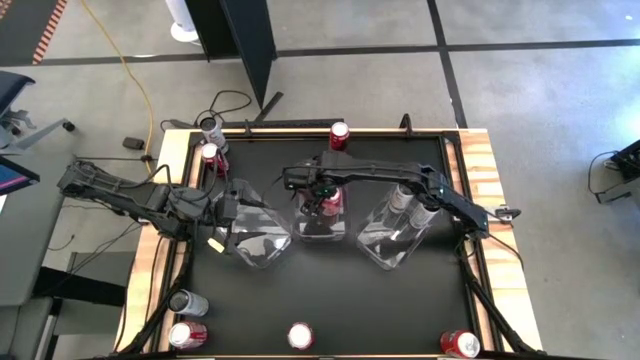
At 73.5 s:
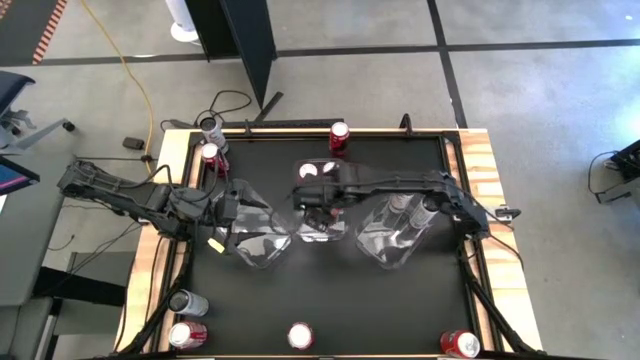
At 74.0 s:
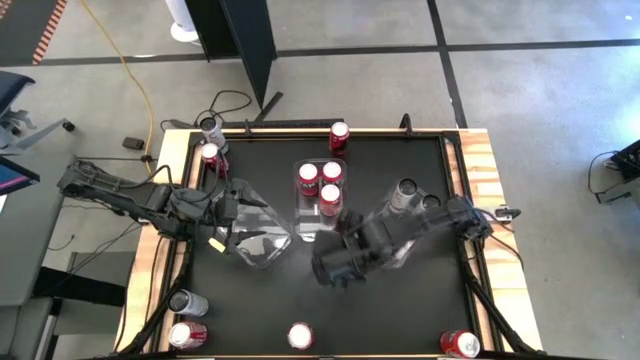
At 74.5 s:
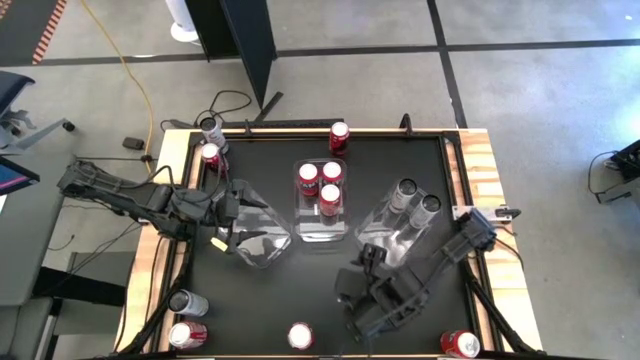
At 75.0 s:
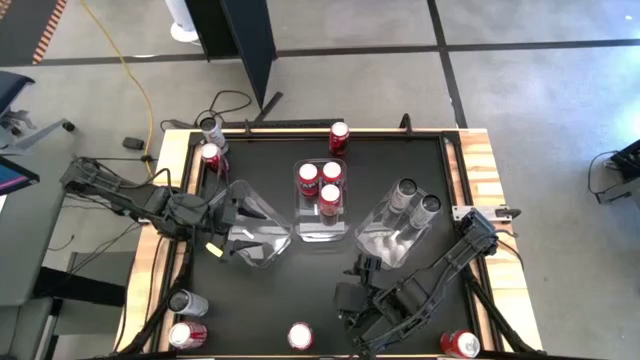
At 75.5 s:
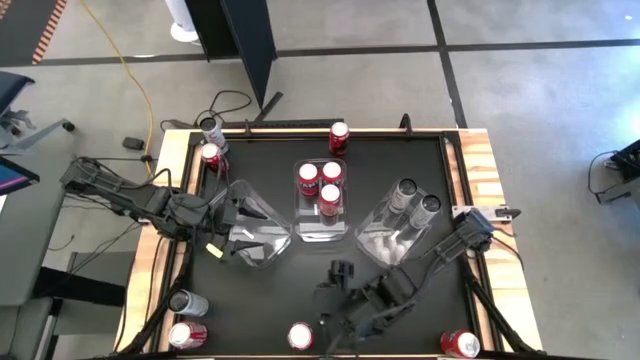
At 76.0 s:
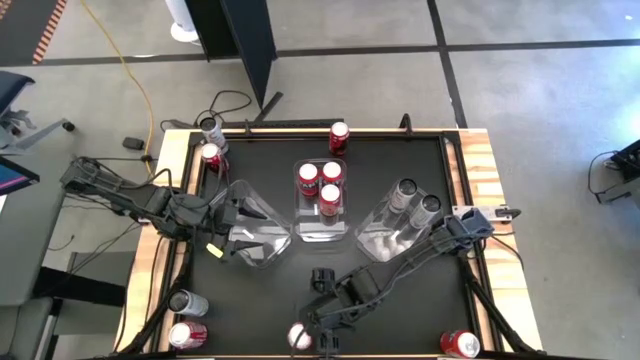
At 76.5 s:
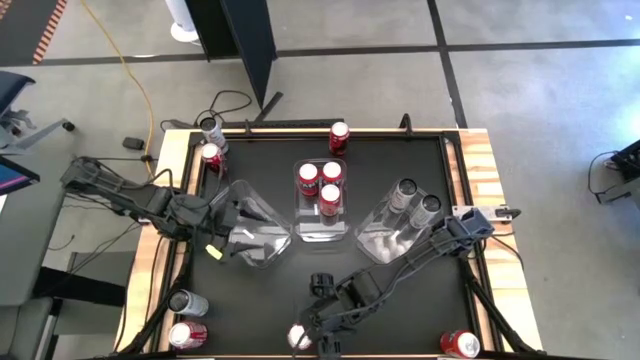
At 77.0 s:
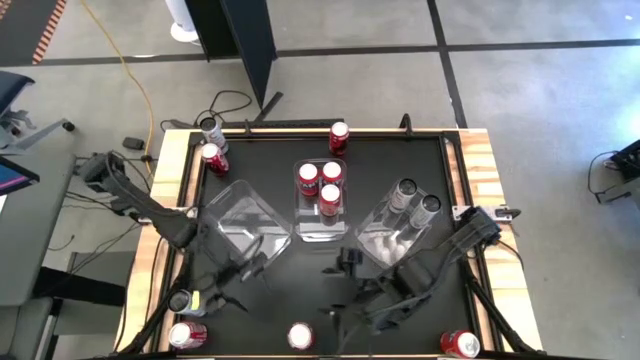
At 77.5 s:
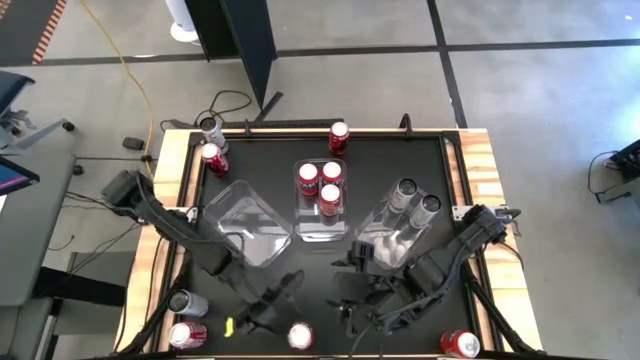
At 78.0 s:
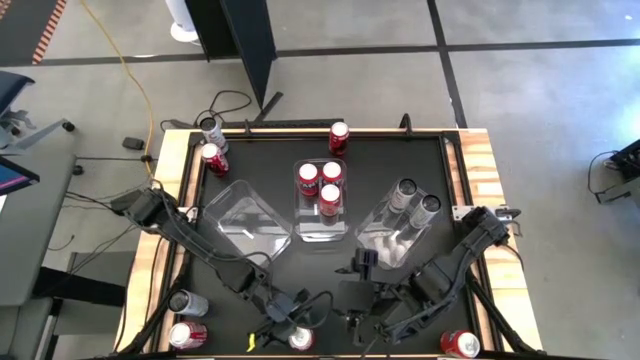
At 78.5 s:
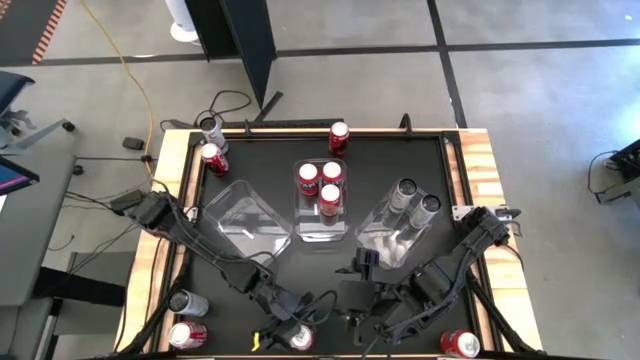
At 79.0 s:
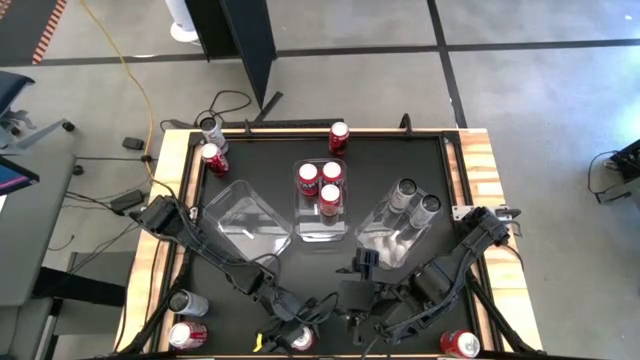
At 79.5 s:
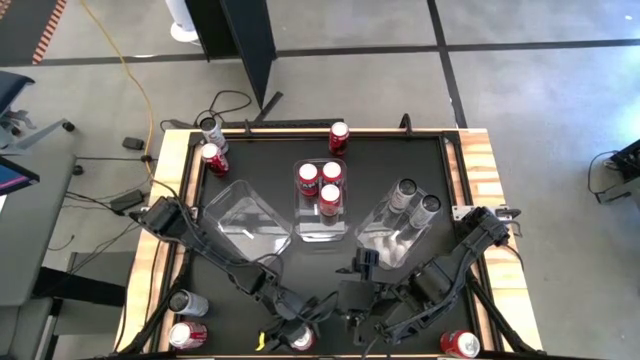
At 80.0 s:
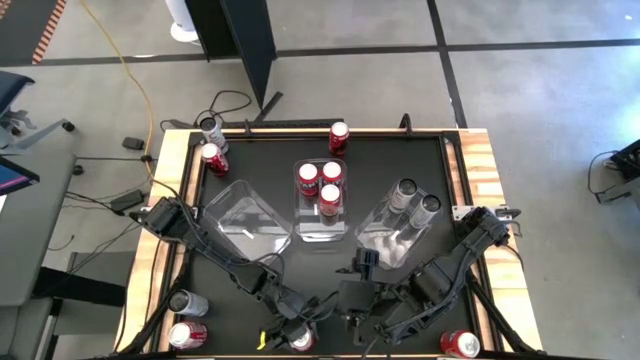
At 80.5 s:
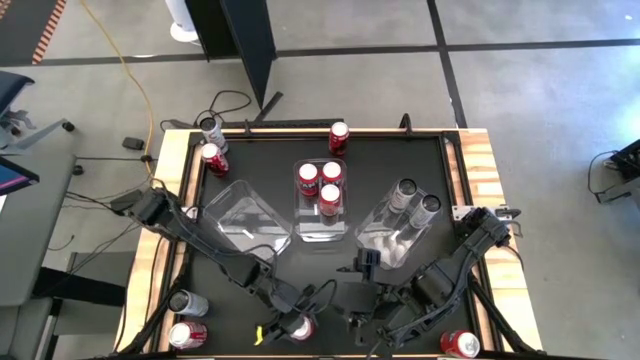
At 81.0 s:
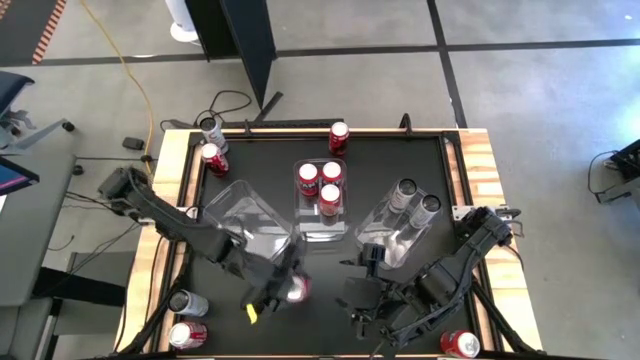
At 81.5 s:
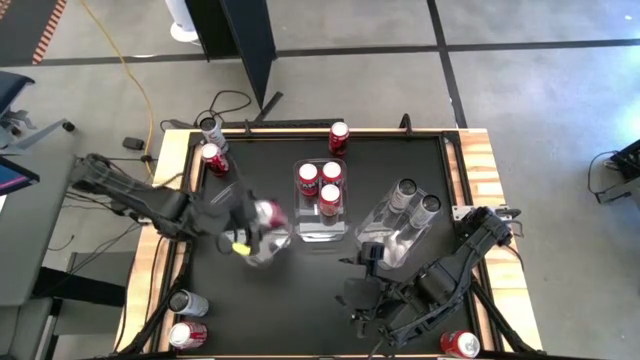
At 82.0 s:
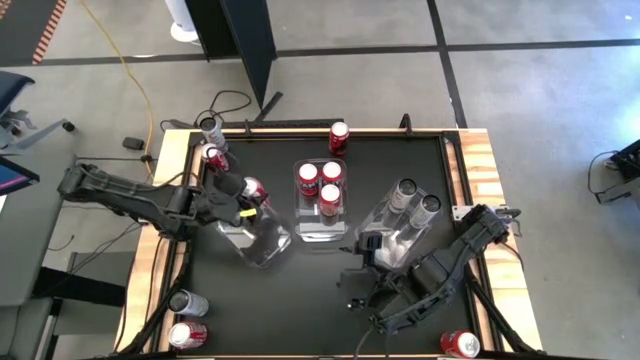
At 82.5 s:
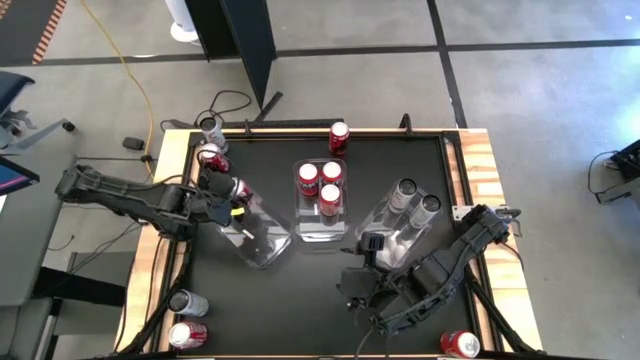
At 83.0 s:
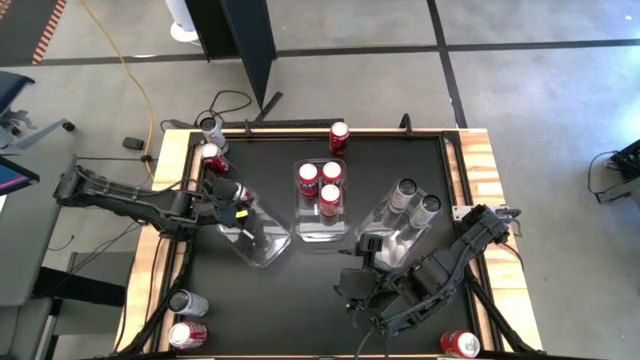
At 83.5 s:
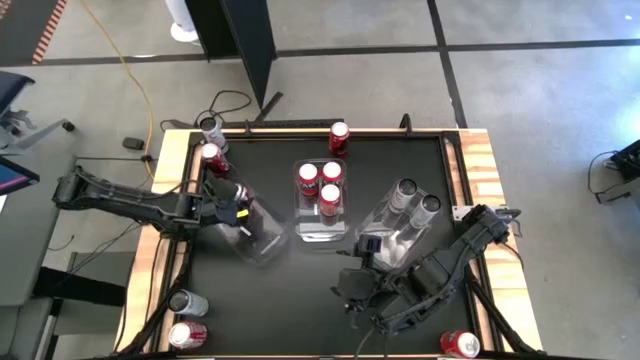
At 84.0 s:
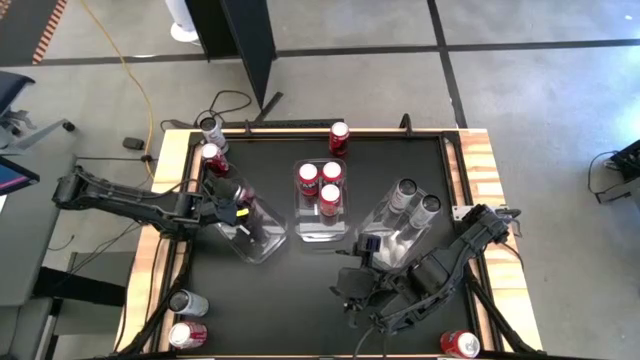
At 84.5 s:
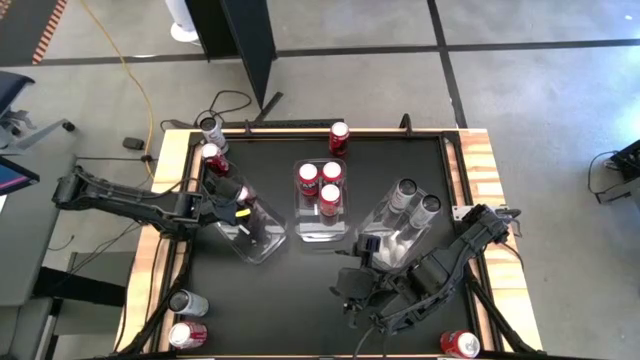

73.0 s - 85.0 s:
Task: Sort soda cans
Put the bottom center red soda can into the left transparent bin

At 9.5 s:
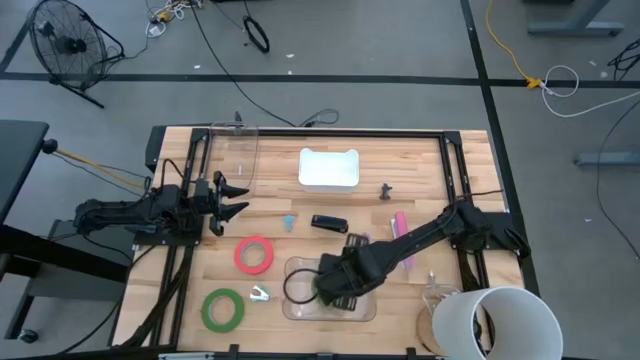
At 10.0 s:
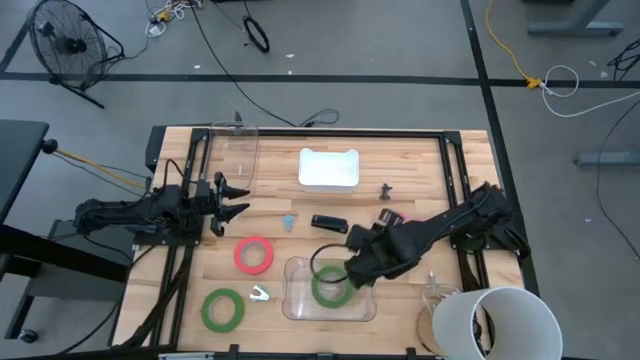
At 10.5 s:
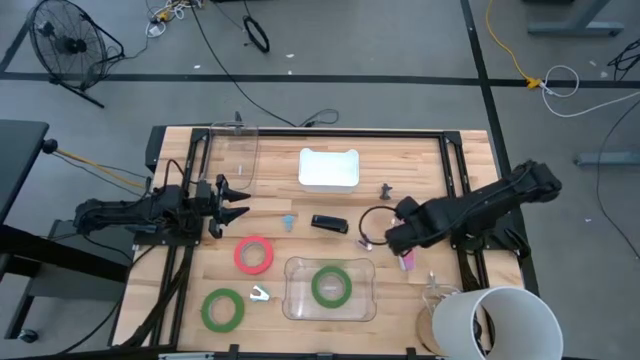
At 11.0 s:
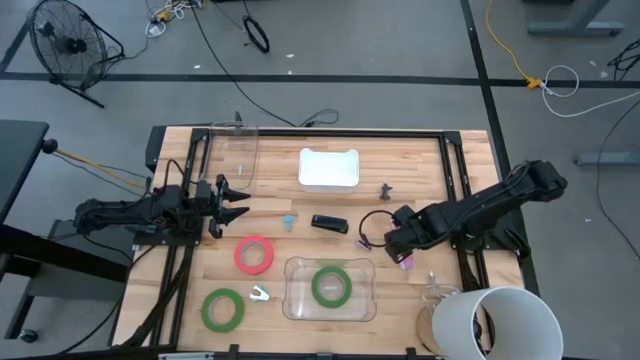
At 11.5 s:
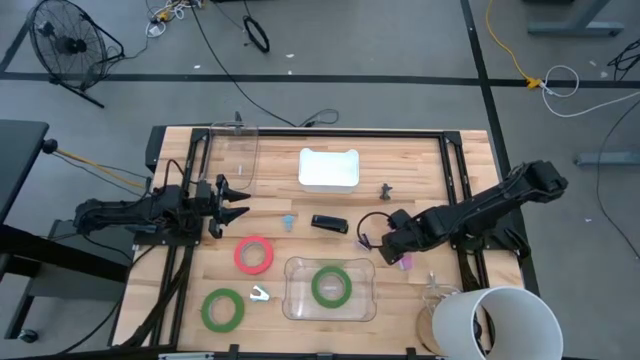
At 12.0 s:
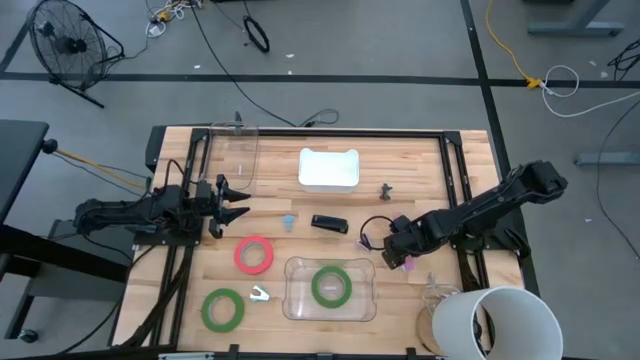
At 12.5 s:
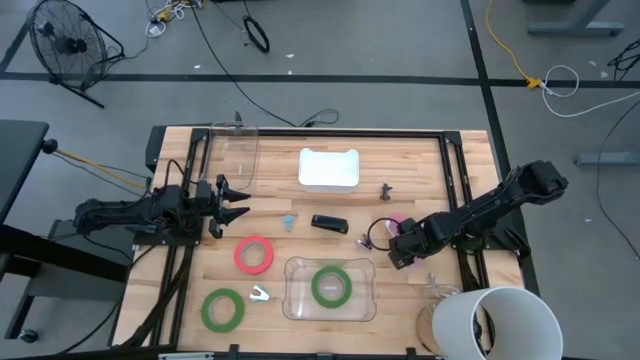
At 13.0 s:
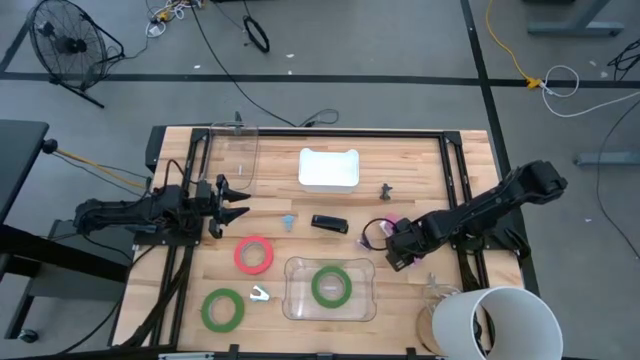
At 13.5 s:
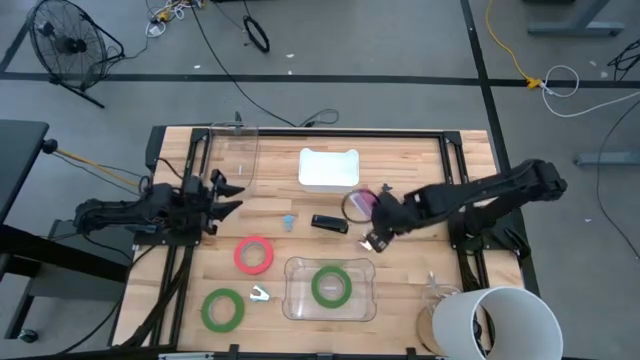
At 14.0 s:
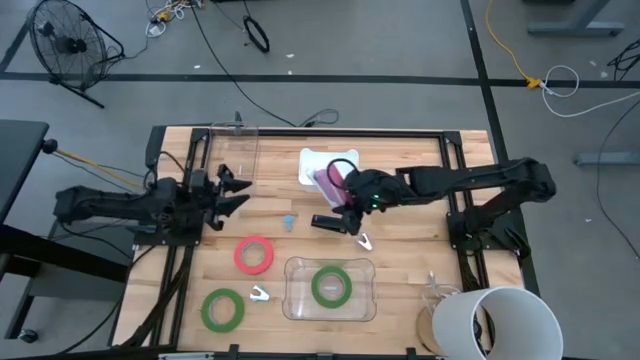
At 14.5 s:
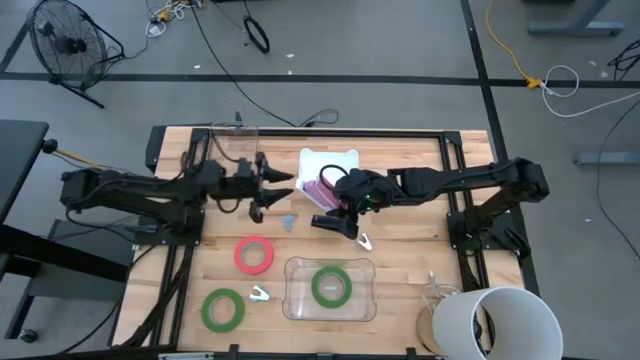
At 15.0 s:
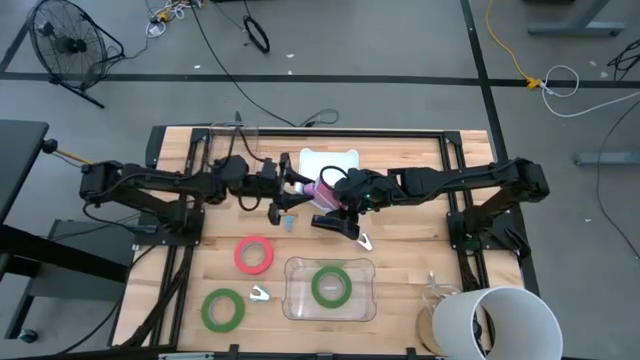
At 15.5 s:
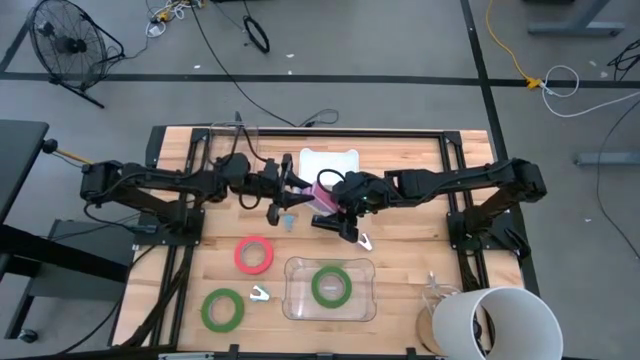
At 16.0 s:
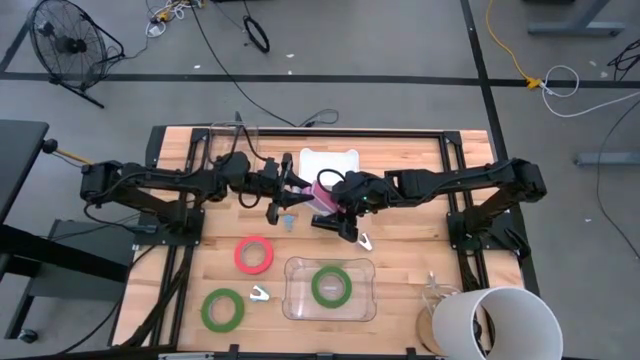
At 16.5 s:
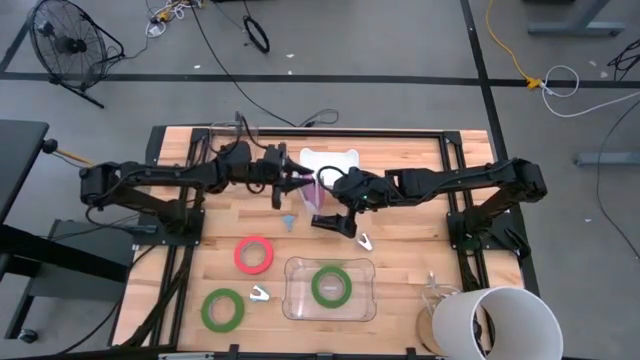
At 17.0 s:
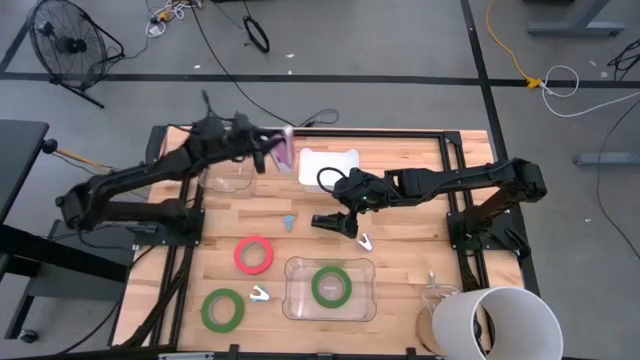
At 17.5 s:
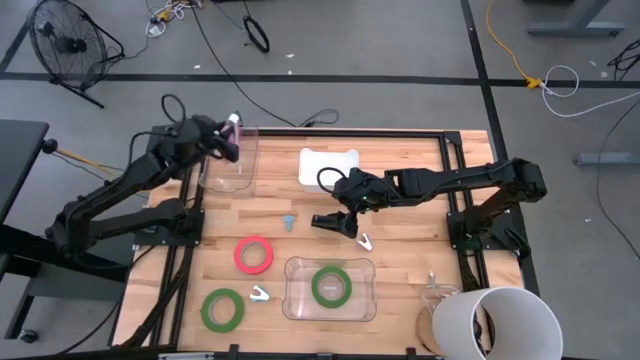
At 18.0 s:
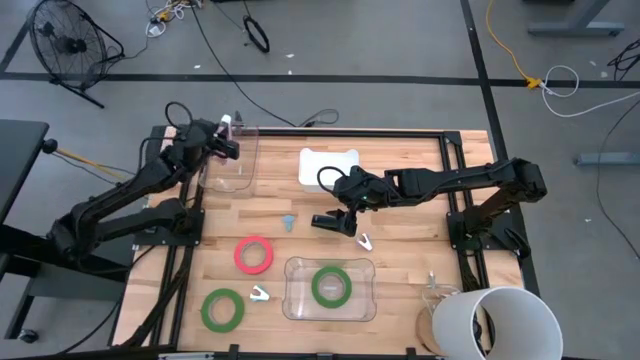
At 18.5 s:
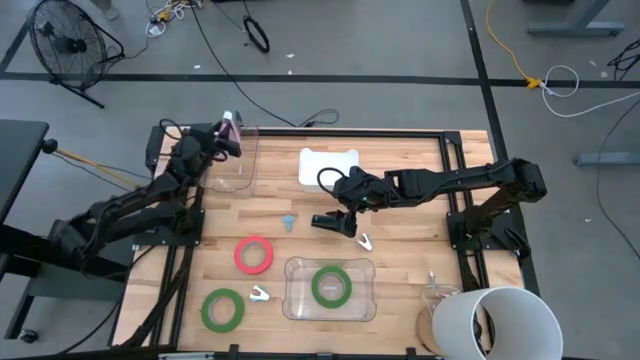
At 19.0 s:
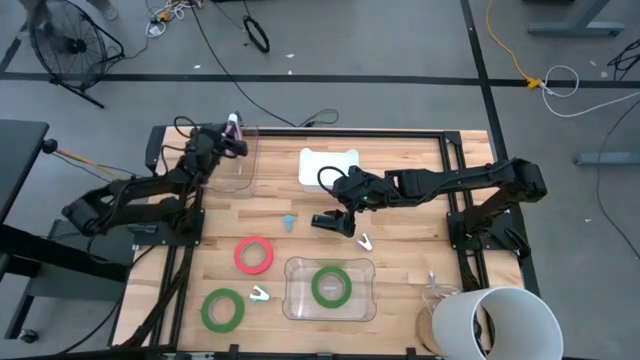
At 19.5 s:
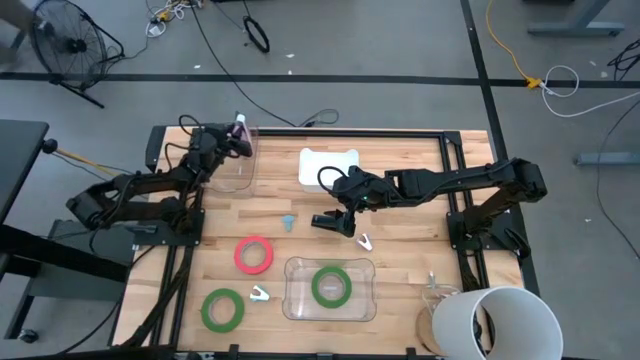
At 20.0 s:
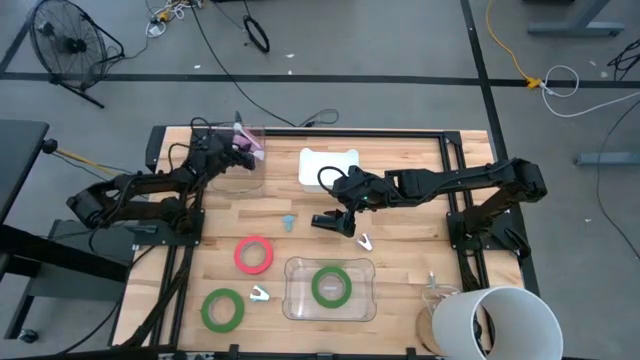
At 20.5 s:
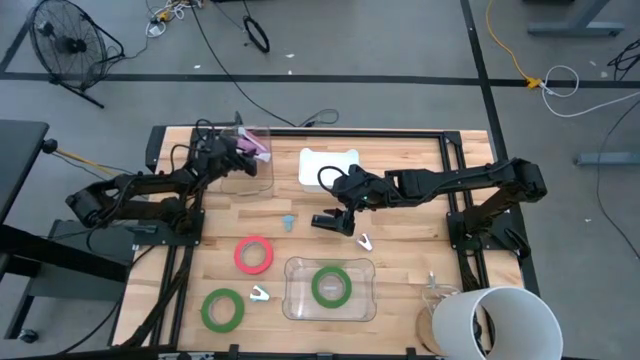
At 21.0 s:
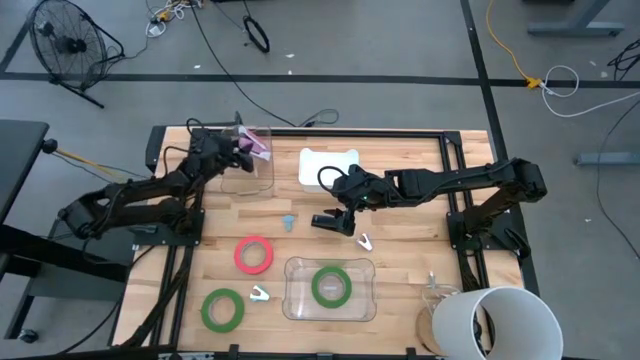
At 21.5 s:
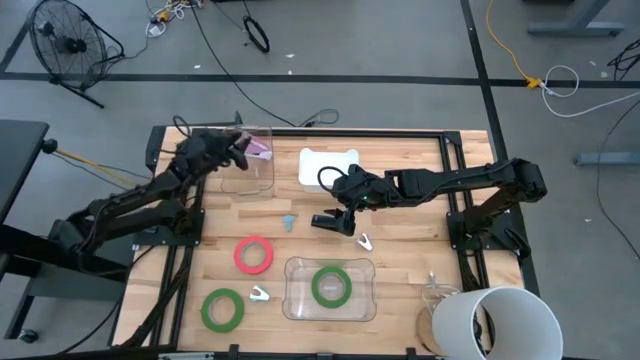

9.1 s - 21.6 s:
Task: Pick and place Stapler, Stapler remover, tape
Put the pink stapler into the top transparent bin
